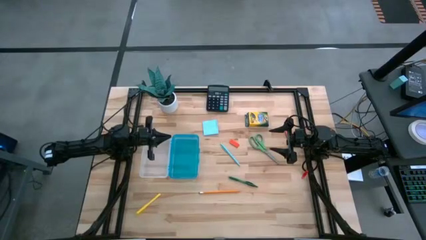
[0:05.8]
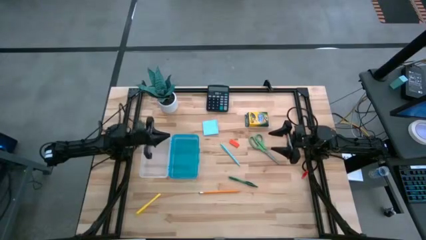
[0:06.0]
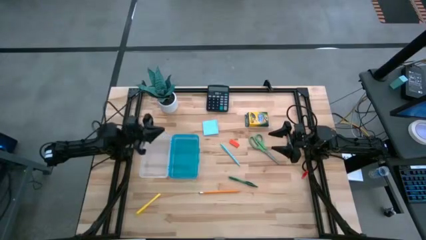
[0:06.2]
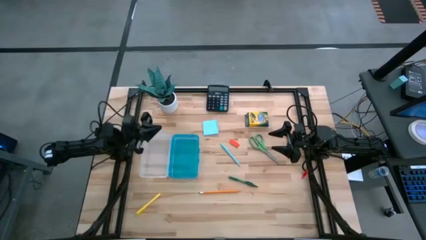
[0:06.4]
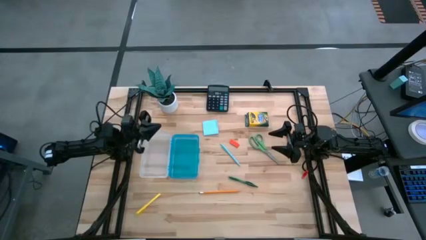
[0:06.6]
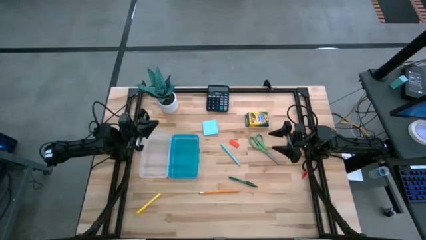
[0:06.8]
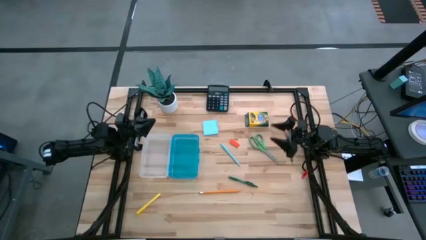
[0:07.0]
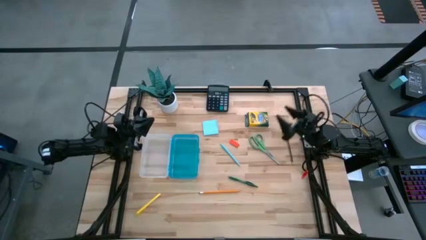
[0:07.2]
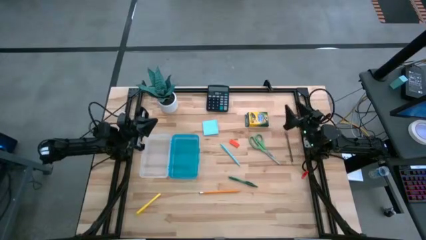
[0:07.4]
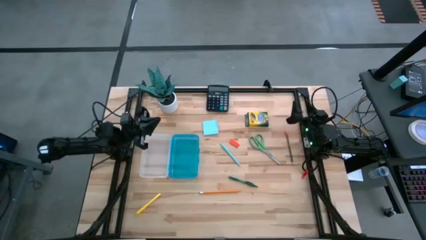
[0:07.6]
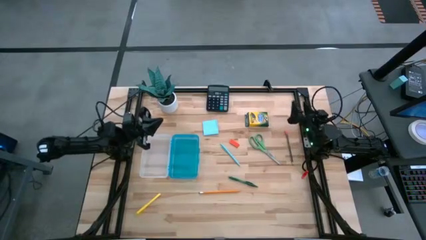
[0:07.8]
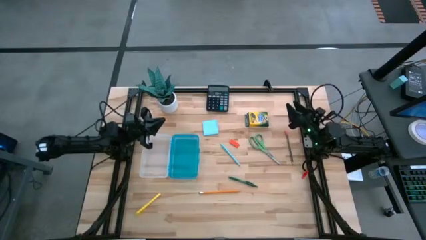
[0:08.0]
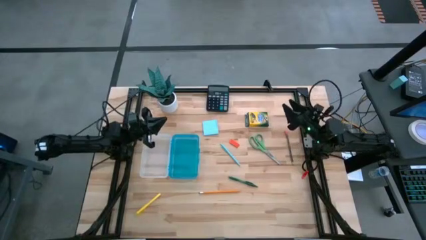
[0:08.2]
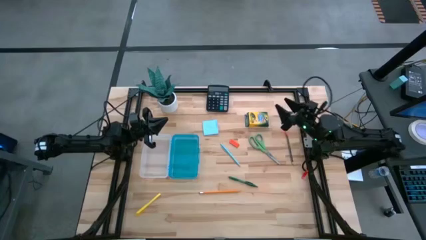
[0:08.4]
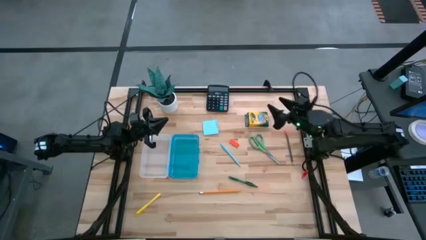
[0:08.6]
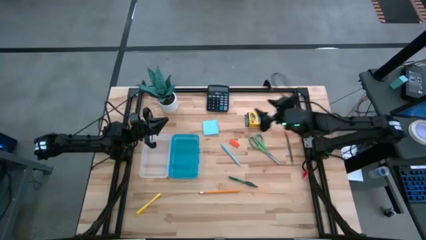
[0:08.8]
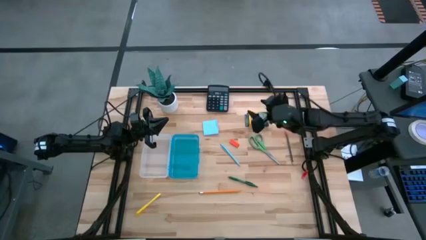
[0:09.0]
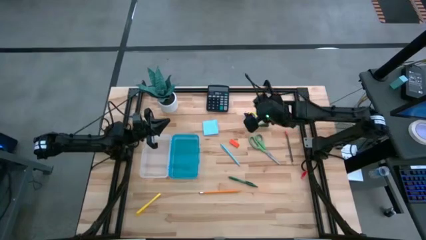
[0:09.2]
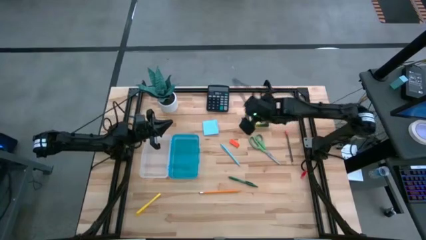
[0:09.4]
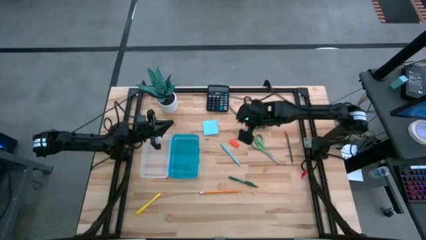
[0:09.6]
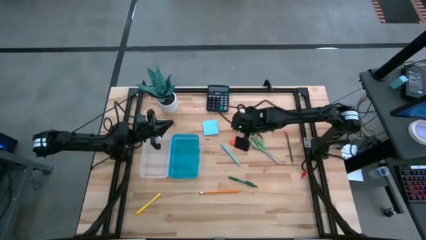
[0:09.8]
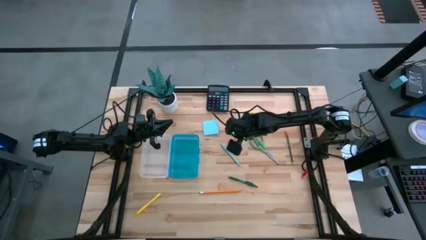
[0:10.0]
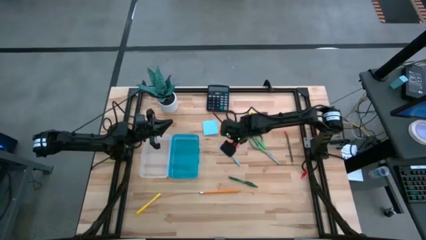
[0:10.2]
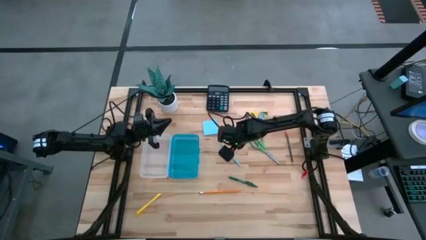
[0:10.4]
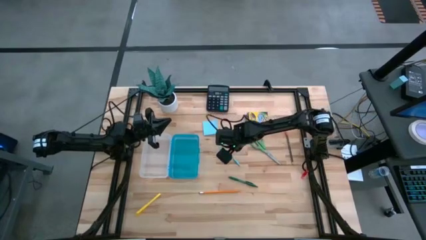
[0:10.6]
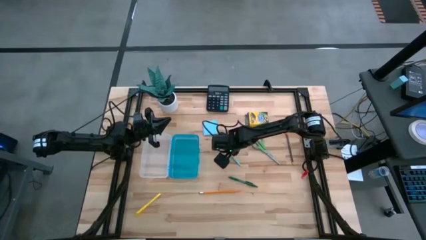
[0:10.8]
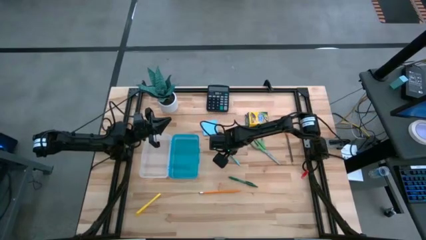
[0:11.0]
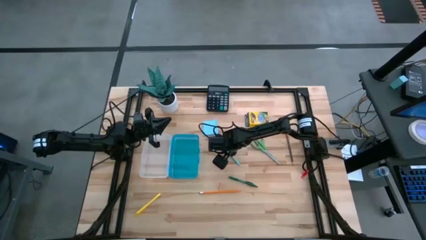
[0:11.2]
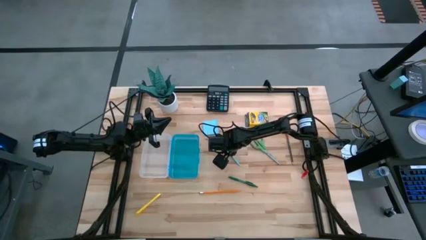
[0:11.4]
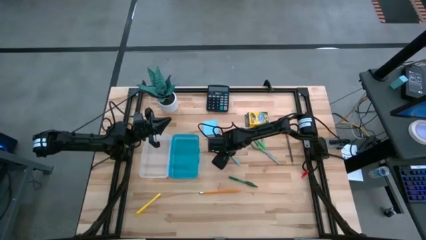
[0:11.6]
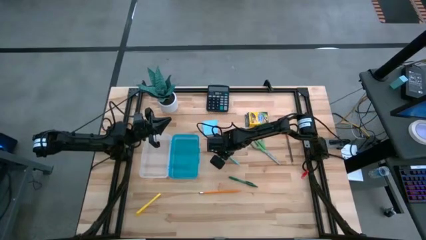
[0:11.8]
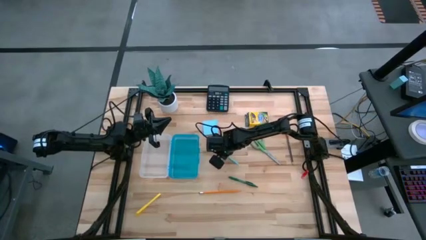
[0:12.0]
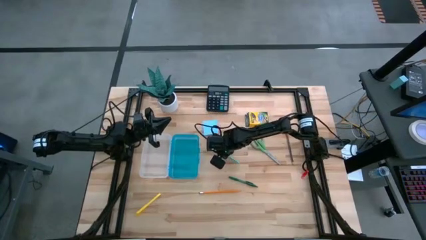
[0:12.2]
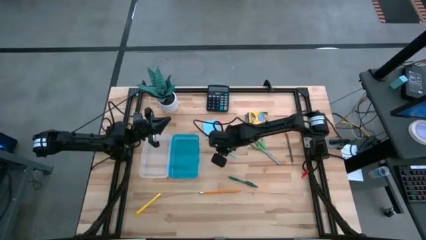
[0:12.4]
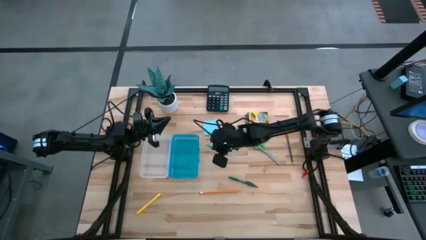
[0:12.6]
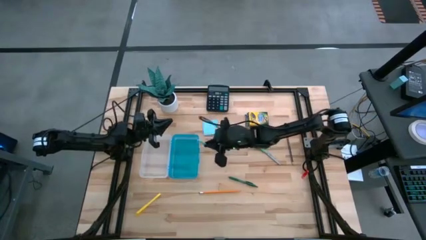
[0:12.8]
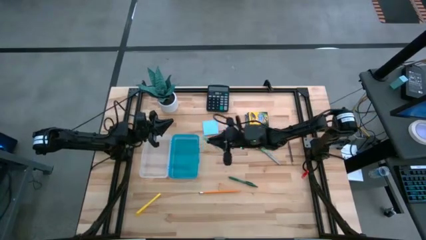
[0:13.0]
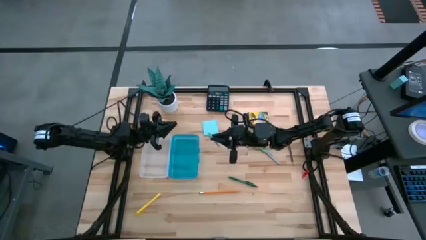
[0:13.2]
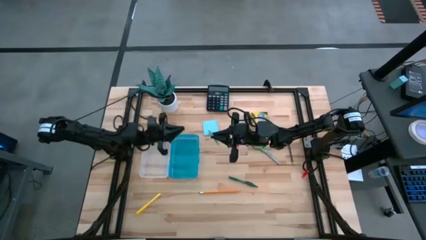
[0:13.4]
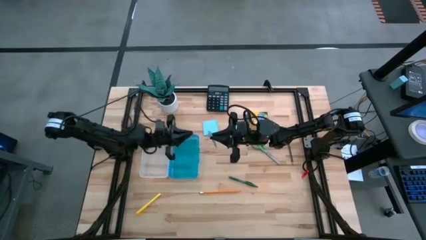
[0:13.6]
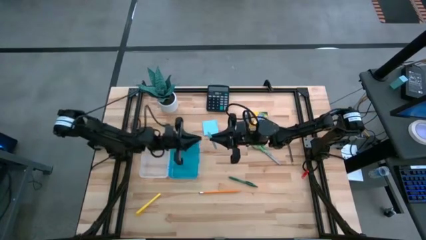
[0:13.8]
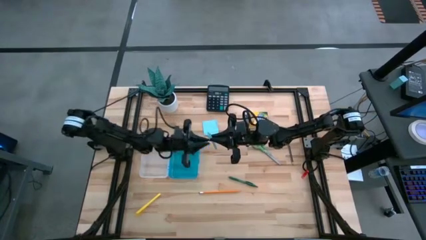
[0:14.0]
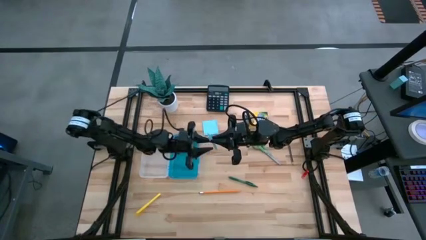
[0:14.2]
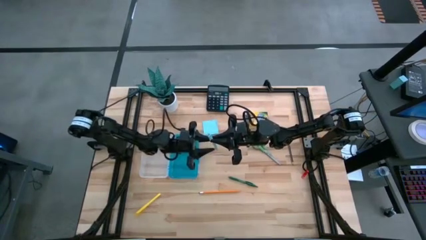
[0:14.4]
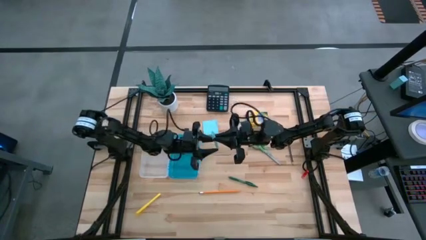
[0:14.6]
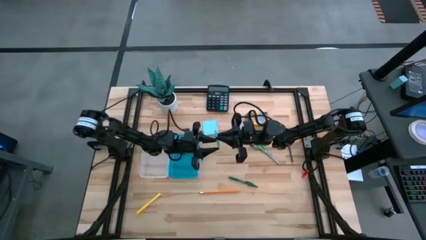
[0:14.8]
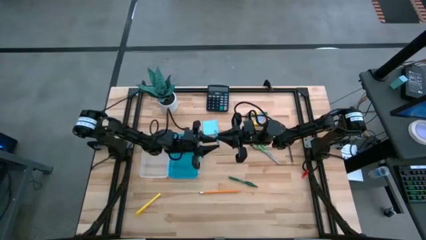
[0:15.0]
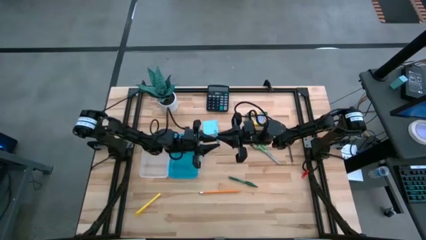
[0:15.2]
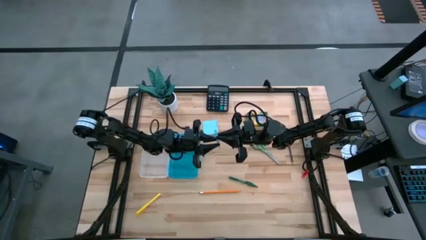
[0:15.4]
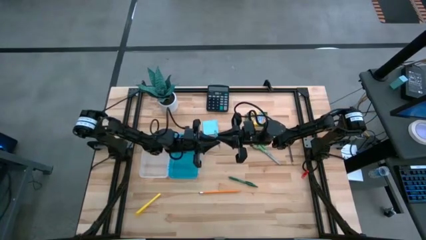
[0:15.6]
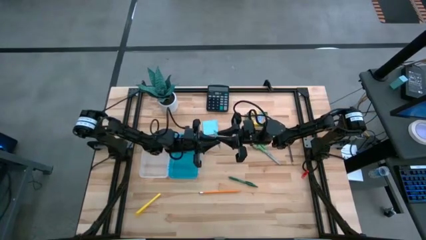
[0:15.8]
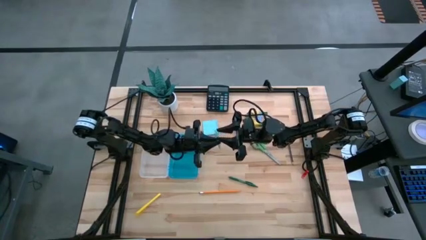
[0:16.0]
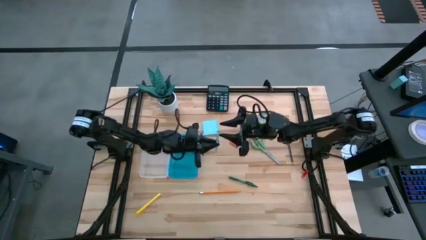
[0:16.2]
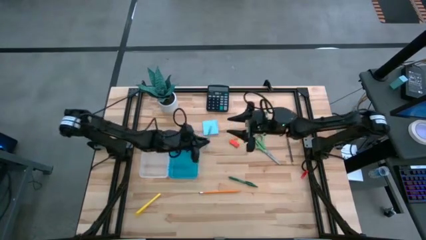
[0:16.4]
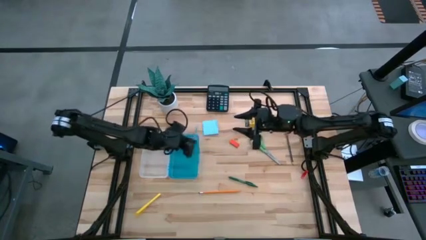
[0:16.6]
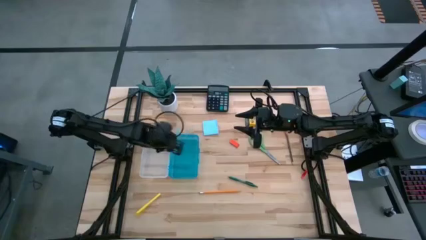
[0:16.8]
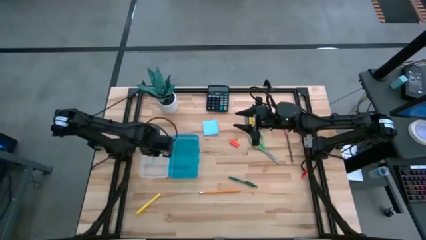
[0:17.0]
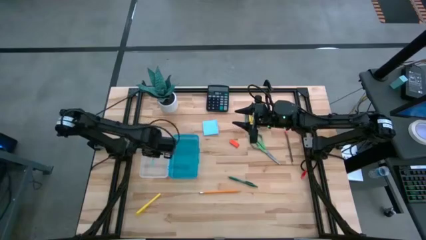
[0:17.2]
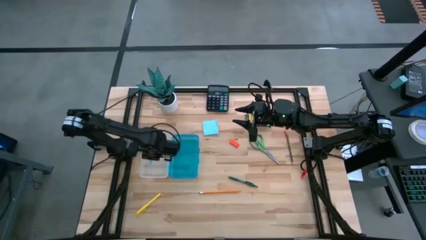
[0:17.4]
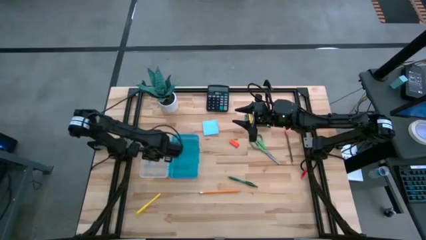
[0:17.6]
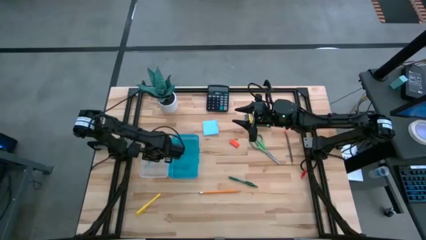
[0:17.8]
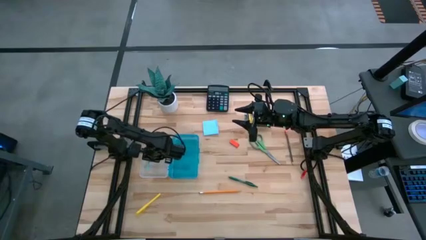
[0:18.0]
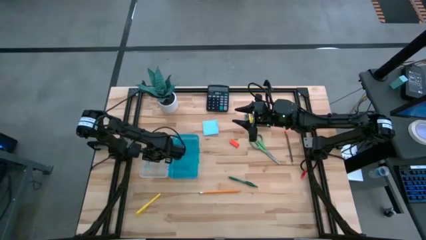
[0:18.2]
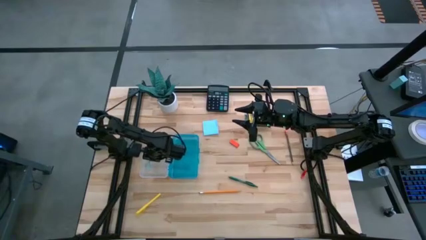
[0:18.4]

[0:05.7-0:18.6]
Task: Pack school essentials
Put the light blue pen into the blue supply box
